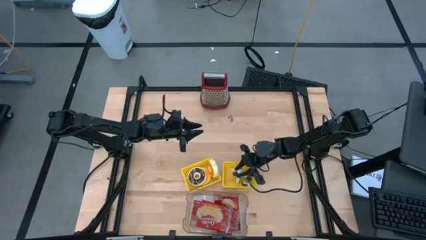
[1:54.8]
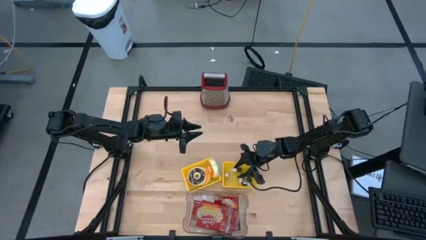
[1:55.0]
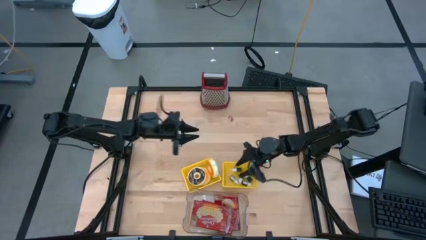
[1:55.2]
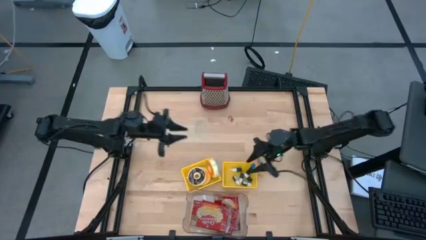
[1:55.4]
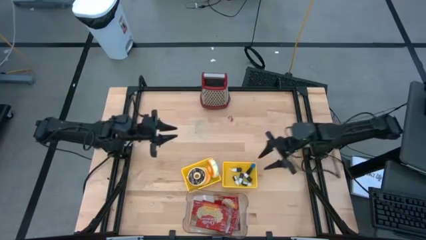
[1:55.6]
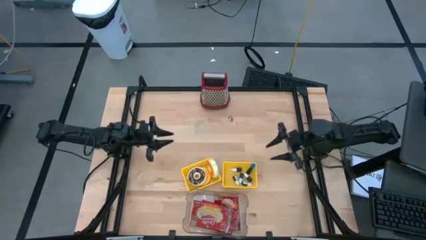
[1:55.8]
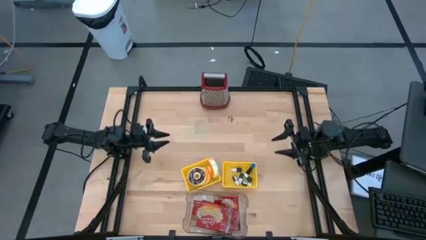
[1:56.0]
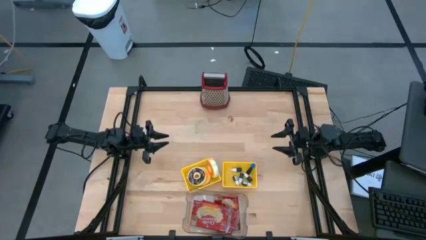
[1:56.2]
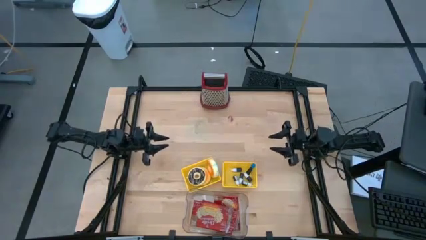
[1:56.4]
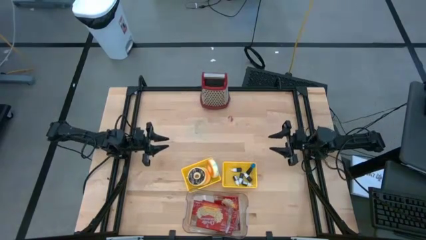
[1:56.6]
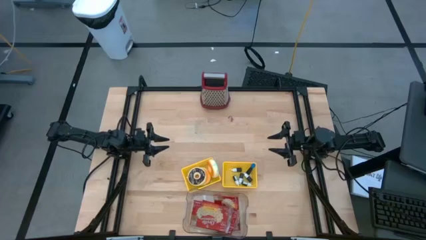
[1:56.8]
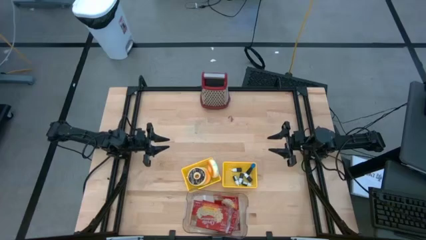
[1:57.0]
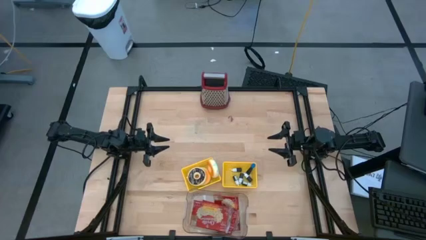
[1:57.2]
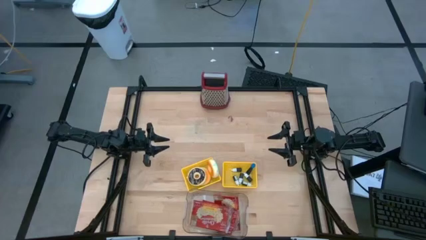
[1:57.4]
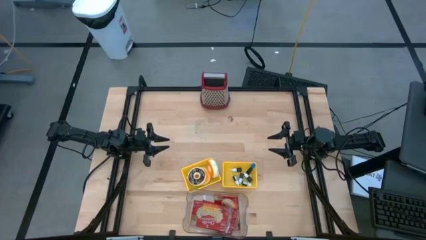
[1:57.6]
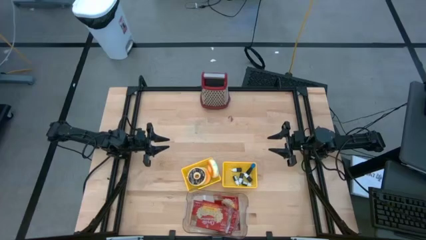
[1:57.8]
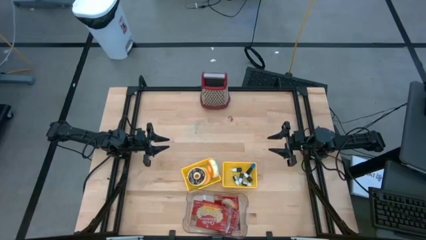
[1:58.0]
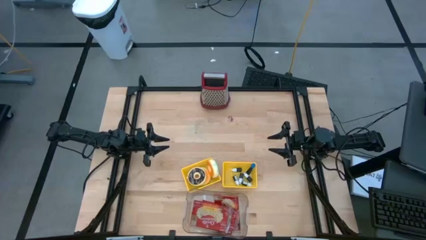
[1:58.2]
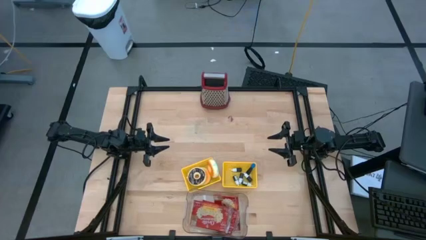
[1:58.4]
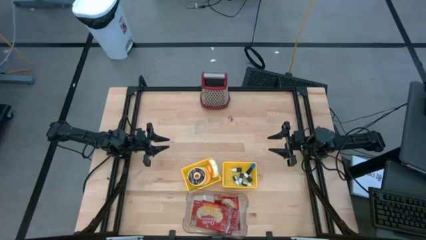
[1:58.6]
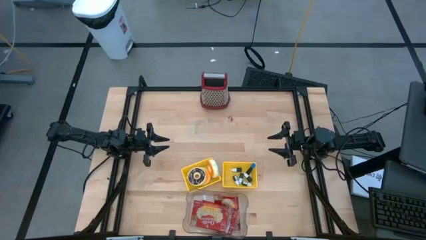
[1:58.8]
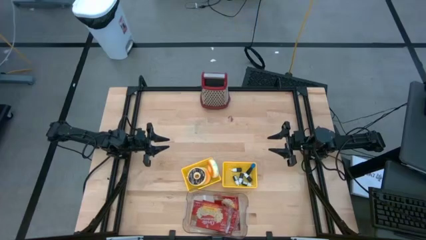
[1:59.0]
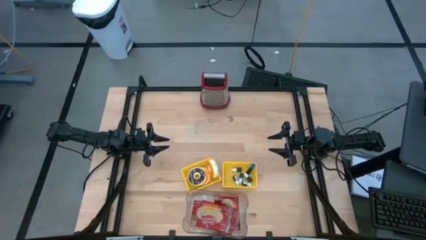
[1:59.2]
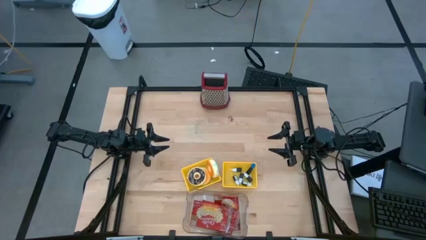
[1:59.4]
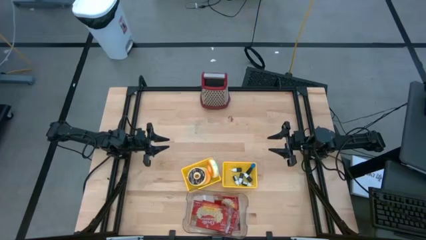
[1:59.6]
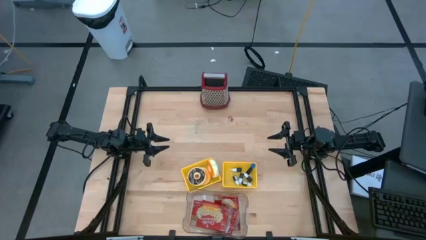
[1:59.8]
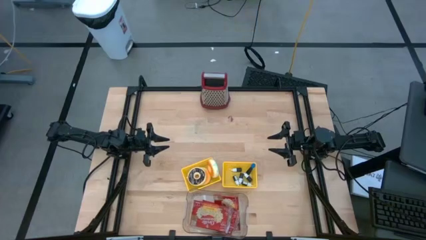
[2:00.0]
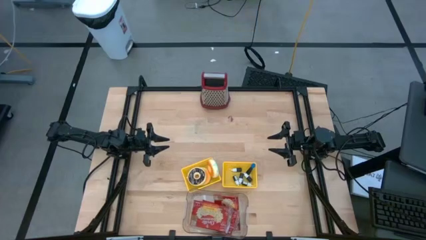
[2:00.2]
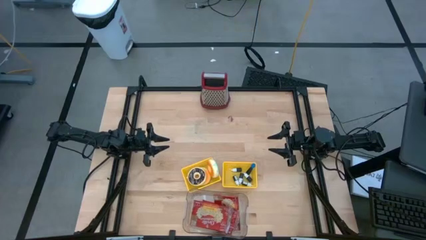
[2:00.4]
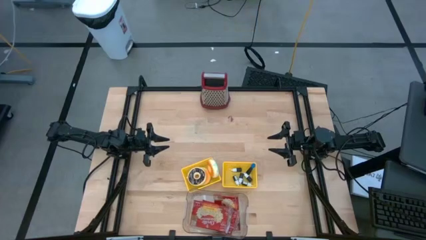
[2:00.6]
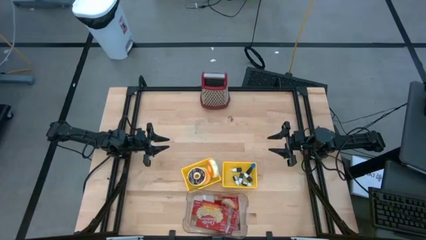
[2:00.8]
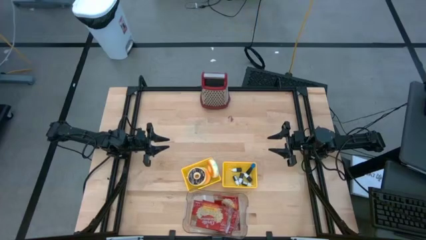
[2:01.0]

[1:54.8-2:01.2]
Return to Home Position

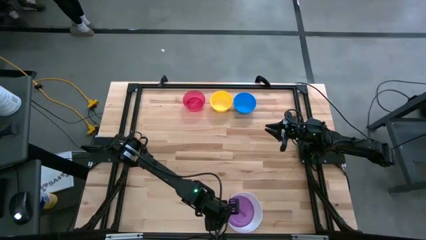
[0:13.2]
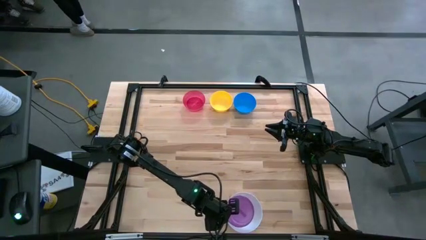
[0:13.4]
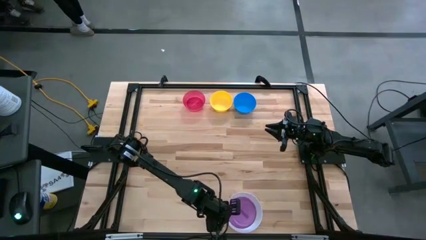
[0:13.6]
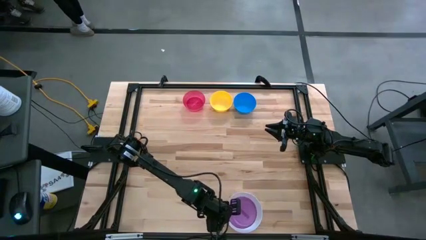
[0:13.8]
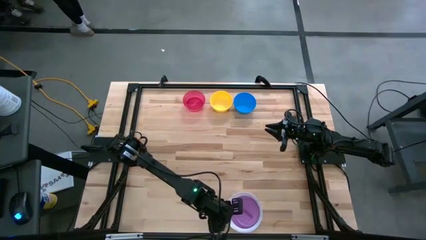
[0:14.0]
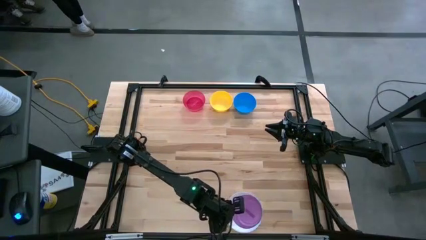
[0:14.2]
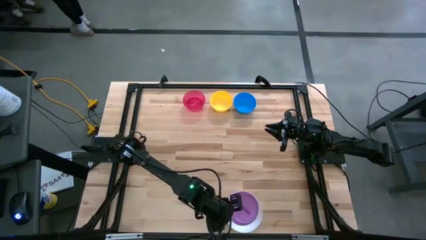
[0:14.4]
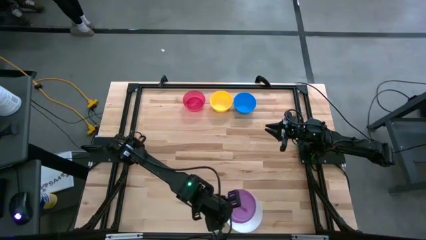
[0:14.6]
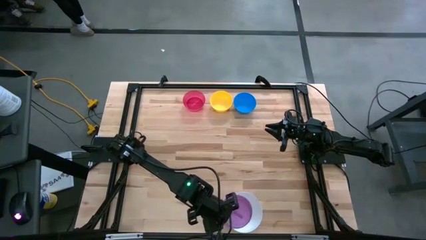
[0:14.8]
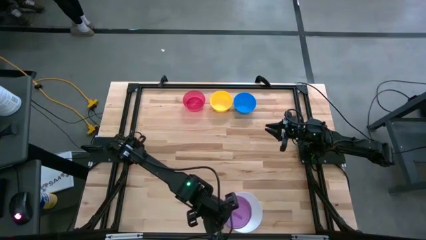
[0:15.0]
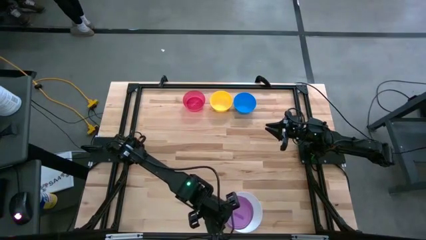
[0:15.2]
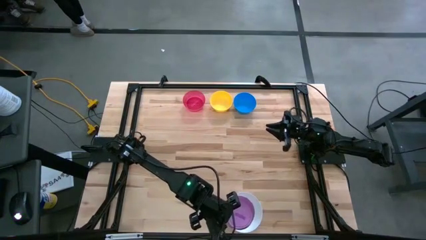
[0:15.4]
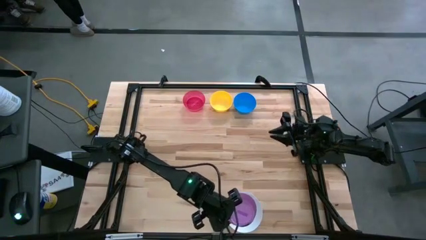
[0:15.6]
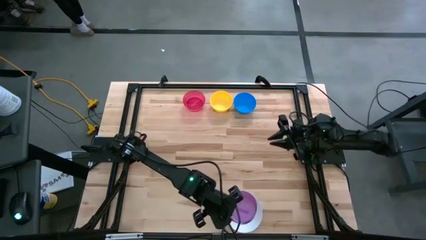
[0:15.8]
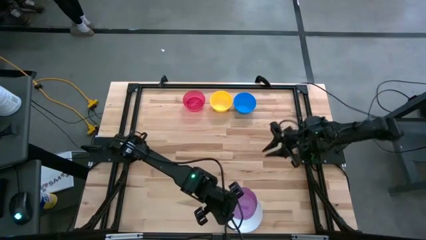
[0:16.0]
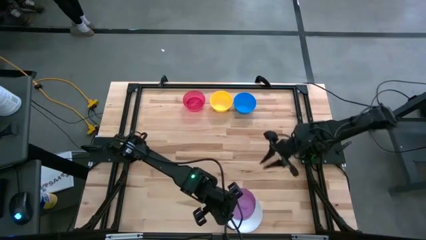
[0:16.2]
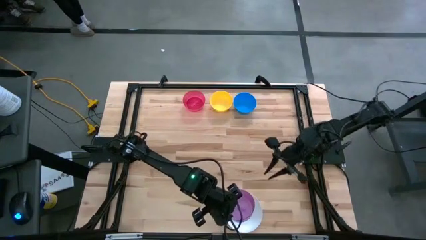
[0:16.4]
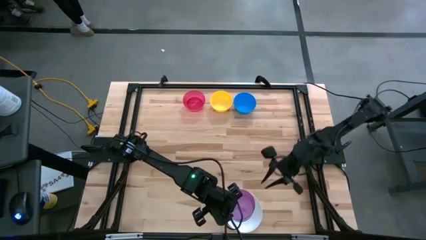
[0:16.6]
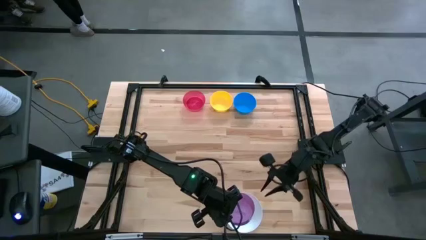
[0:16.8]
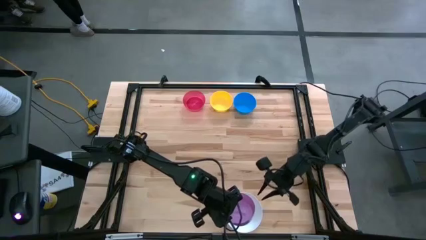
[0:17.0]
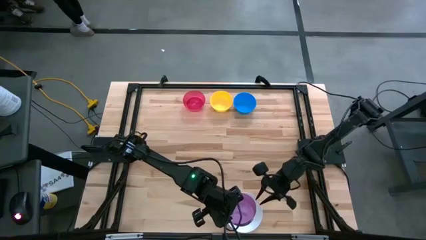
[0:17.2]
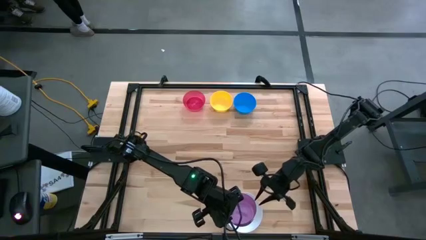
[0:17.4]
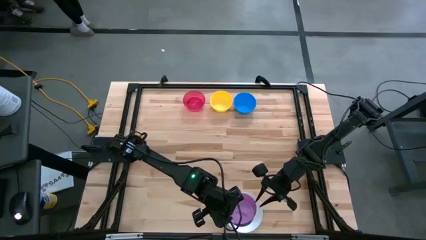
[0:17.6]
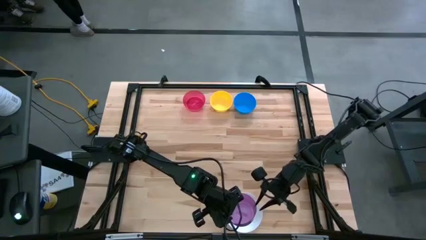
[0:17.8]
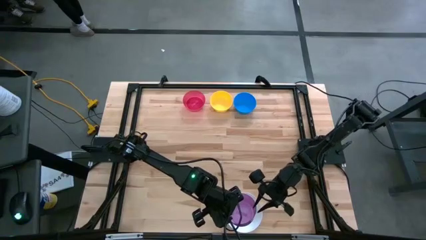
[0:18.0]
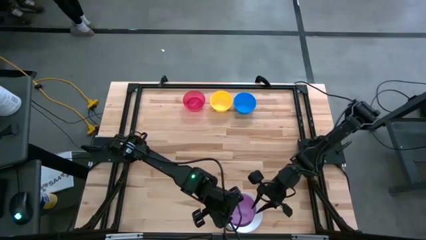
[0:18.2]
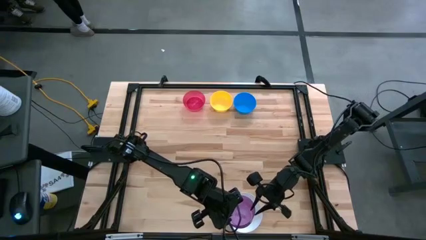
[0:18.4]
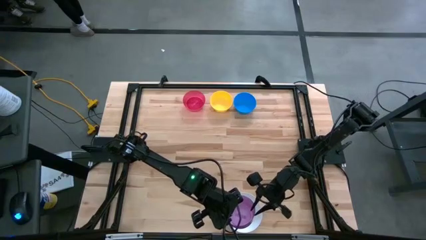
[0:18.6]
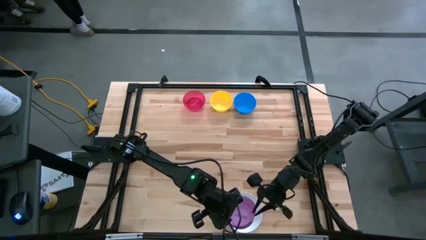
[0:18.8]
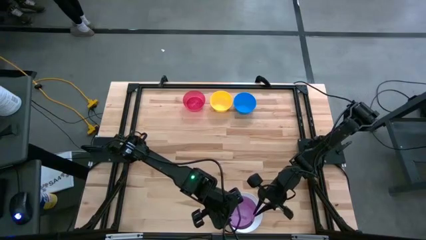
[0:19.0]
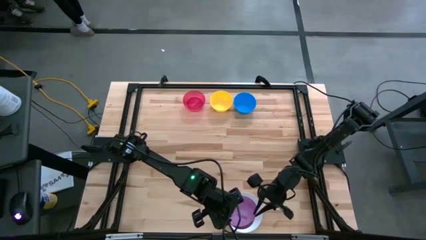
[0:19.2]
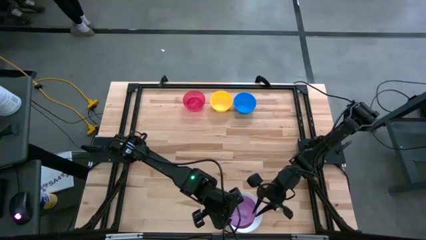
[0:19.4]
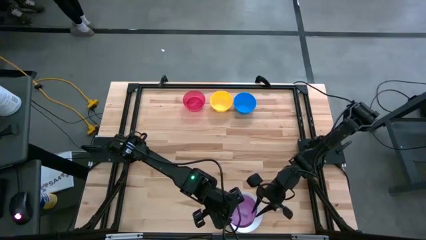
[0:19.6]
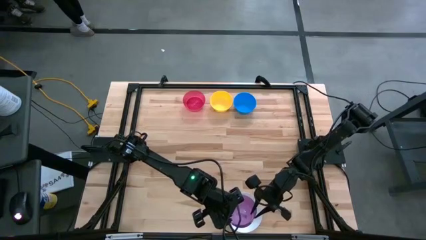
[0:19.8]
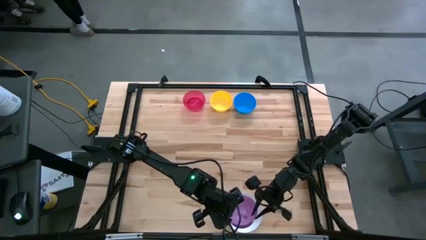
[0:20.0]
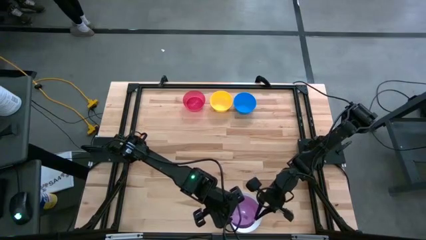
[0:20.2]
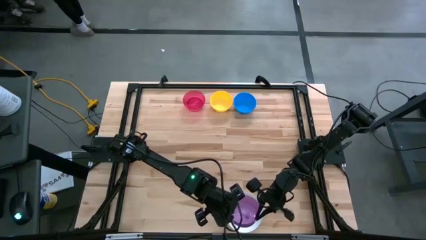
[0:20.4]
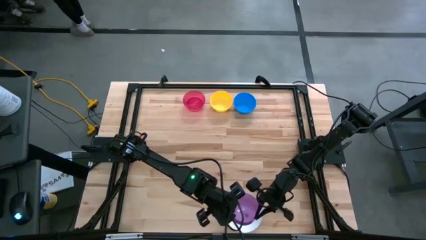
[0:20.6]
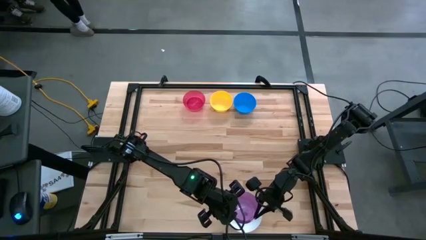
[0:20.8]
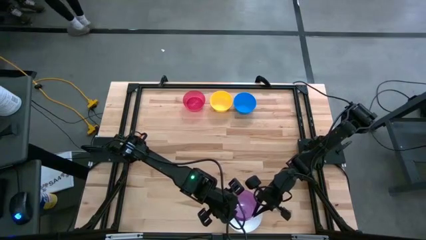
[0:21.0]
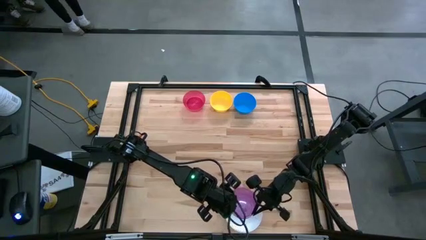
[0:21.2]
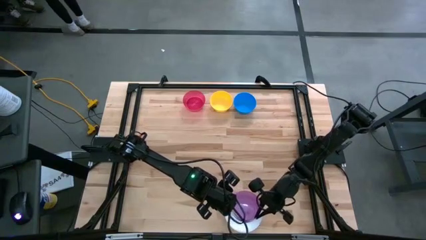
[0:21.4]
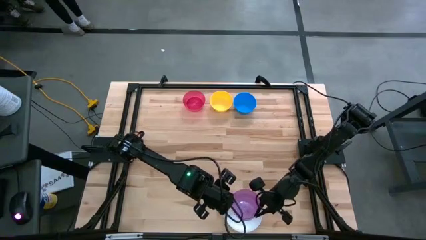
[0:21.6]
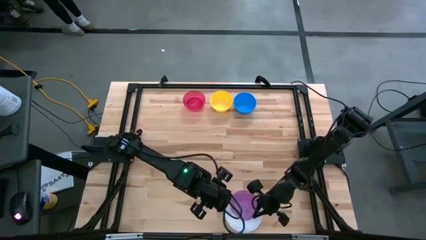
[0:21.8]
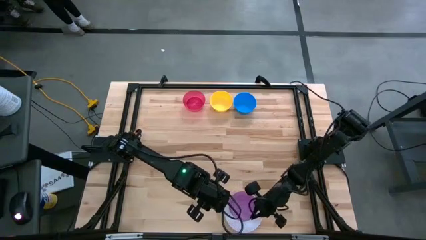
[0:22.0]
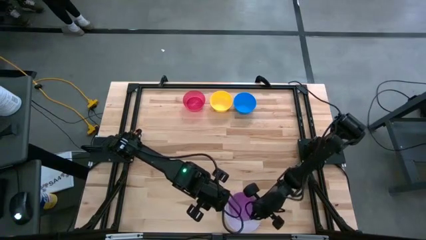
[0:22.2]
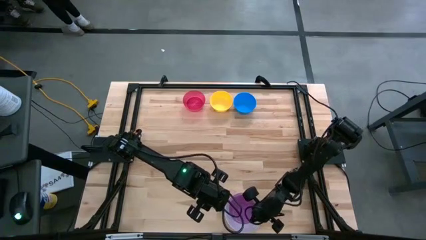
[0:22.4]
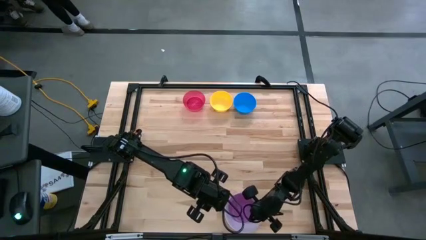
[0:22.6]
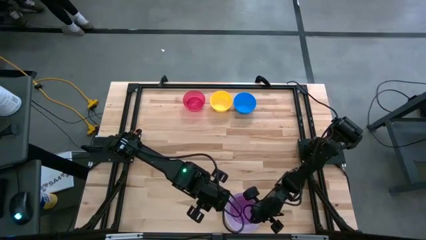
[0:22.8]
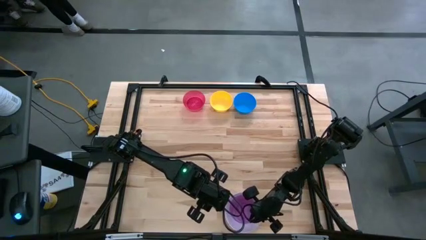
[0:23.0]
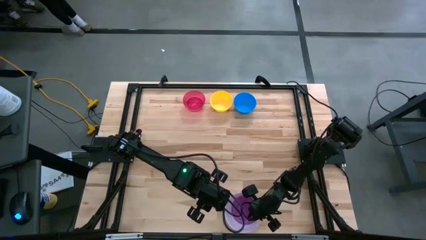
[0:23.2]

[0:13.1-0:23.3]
Stack the violet bowl on the white bowl
